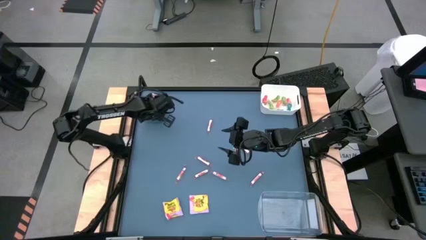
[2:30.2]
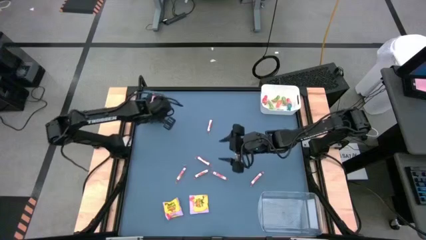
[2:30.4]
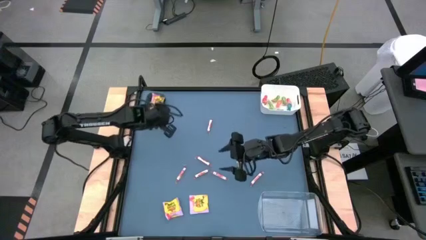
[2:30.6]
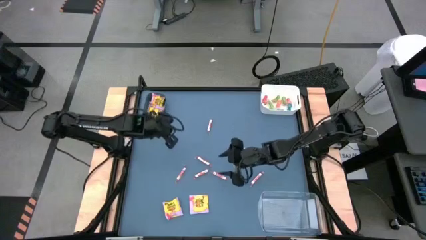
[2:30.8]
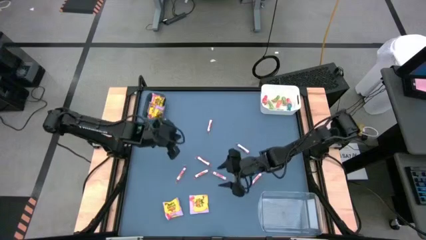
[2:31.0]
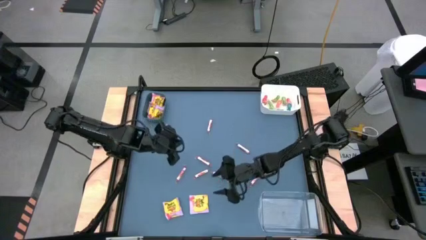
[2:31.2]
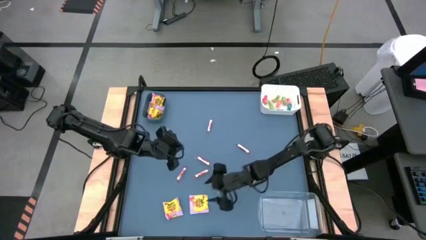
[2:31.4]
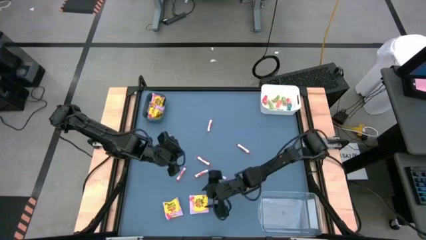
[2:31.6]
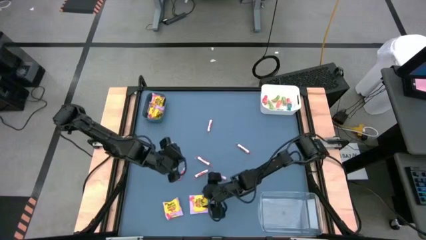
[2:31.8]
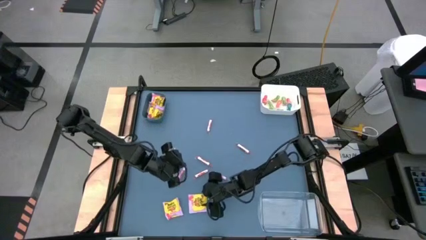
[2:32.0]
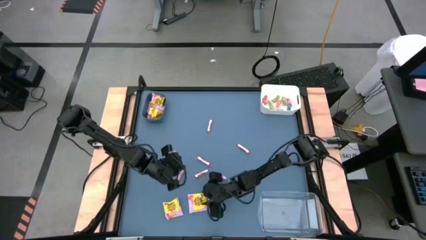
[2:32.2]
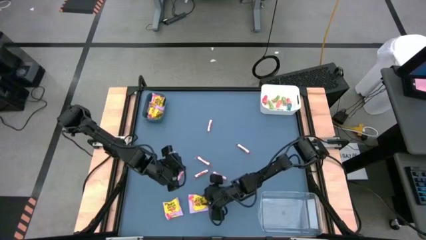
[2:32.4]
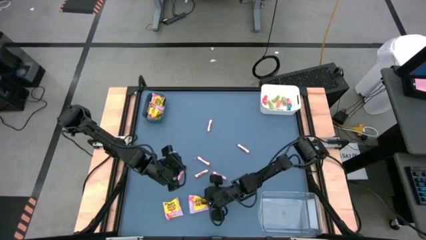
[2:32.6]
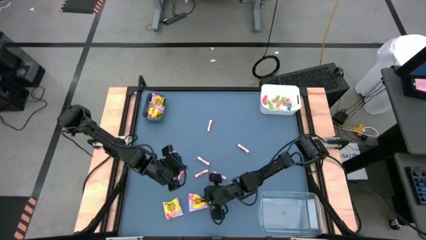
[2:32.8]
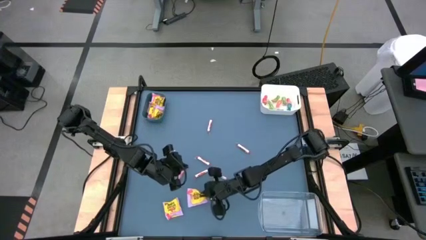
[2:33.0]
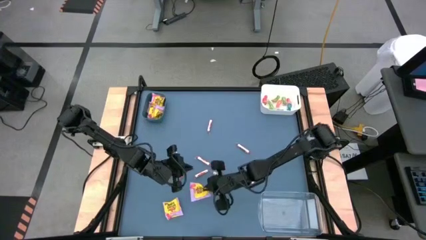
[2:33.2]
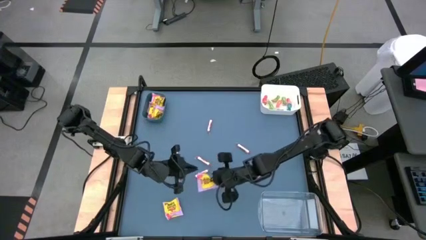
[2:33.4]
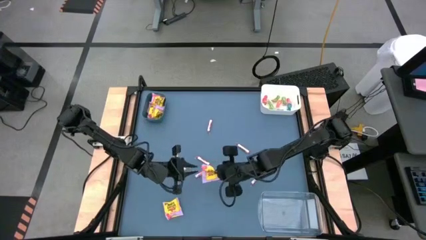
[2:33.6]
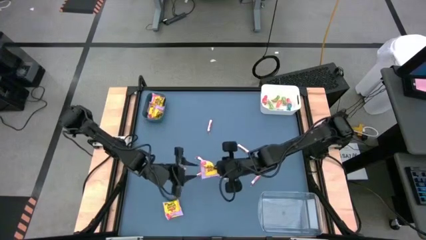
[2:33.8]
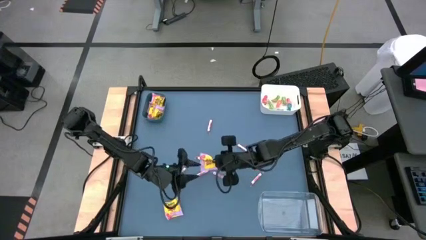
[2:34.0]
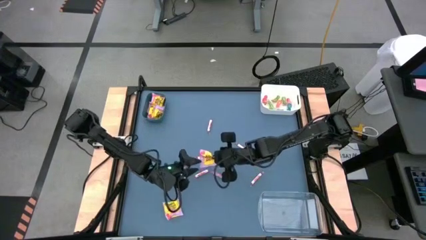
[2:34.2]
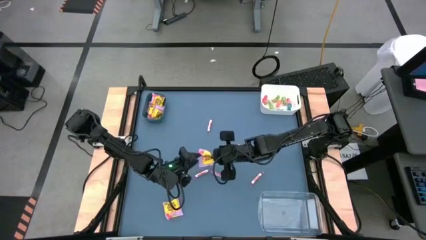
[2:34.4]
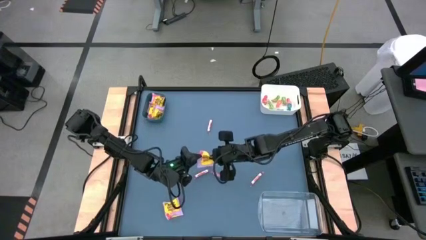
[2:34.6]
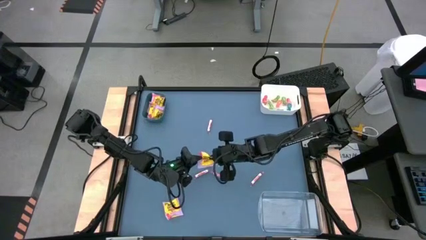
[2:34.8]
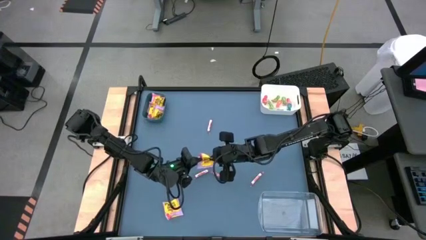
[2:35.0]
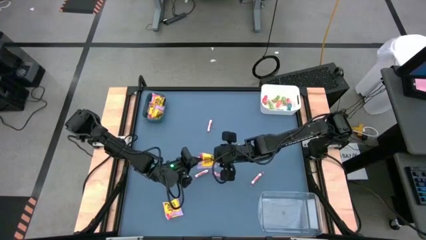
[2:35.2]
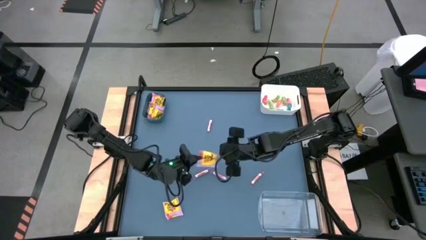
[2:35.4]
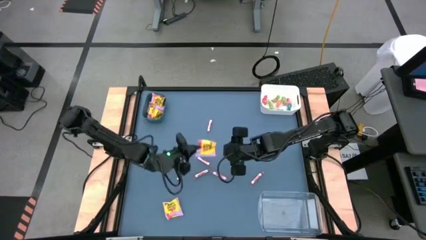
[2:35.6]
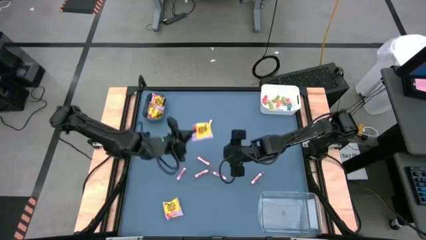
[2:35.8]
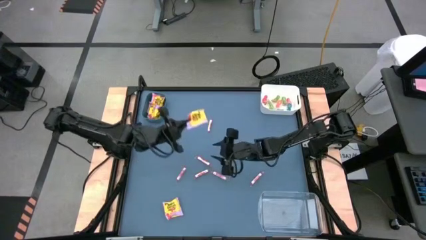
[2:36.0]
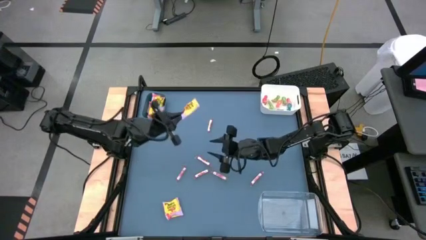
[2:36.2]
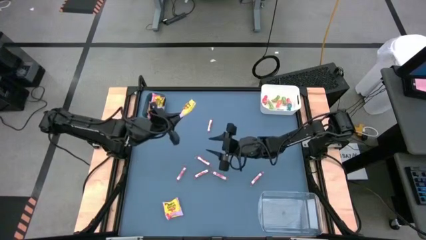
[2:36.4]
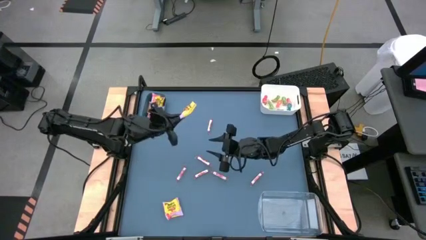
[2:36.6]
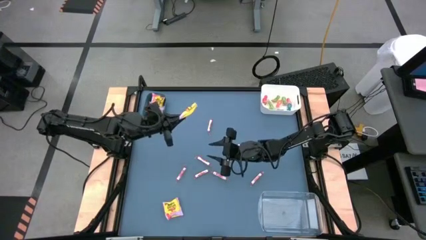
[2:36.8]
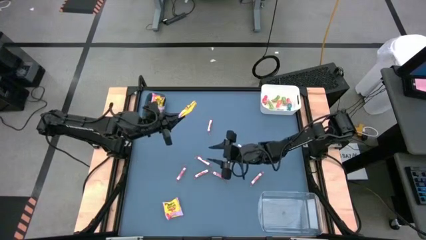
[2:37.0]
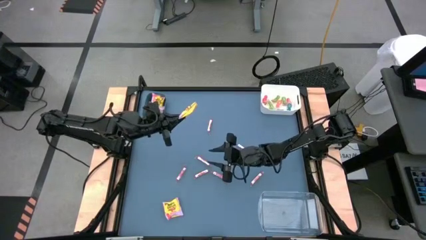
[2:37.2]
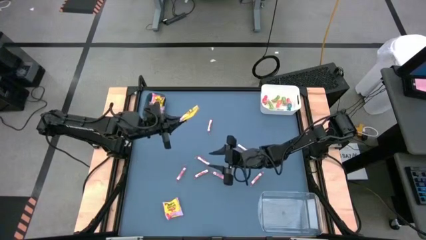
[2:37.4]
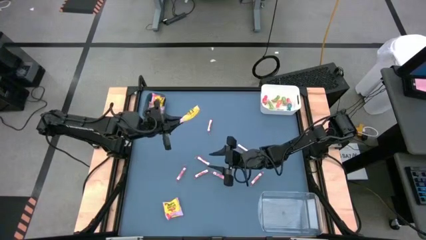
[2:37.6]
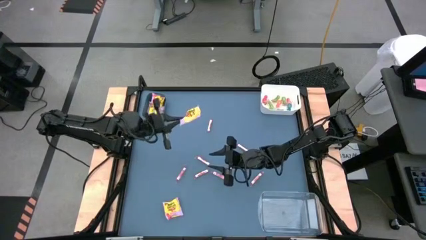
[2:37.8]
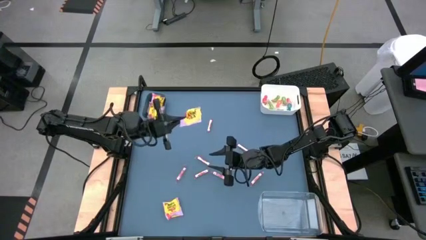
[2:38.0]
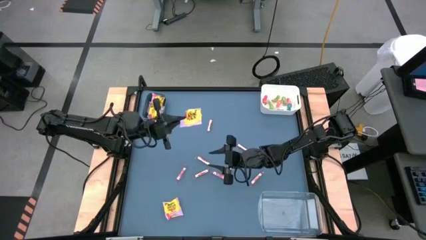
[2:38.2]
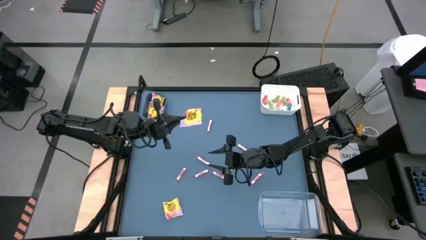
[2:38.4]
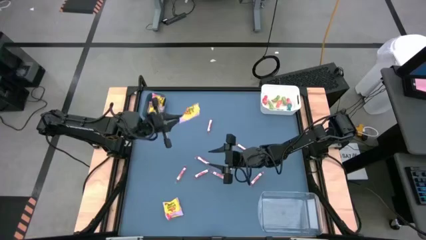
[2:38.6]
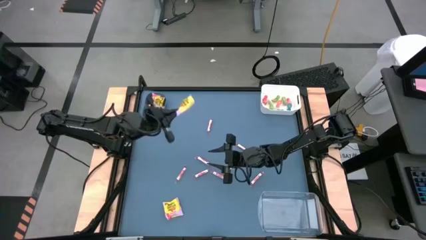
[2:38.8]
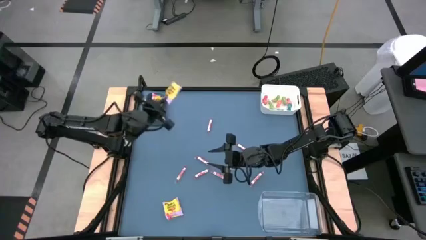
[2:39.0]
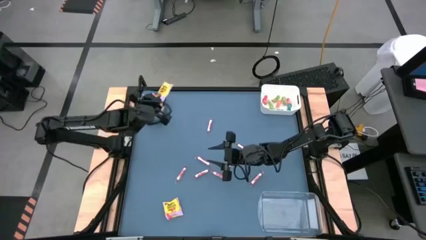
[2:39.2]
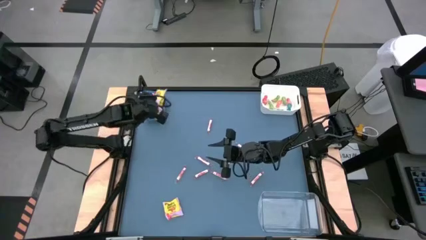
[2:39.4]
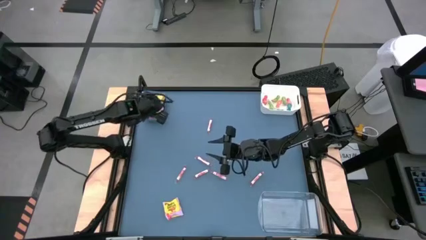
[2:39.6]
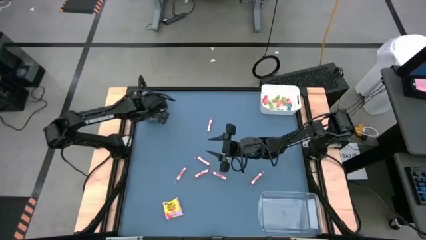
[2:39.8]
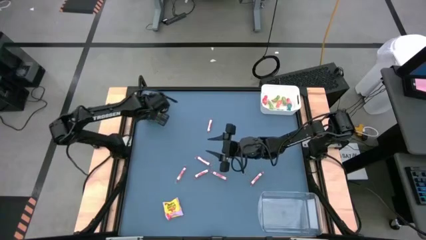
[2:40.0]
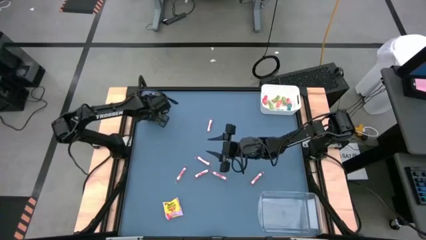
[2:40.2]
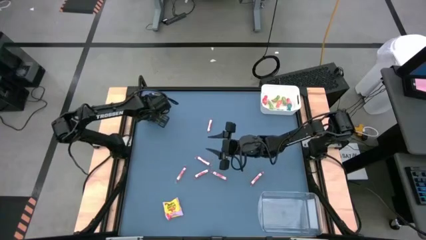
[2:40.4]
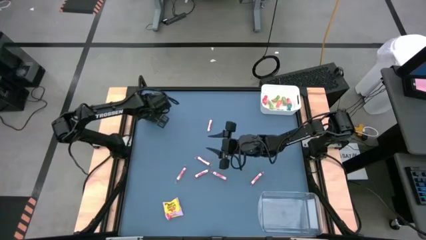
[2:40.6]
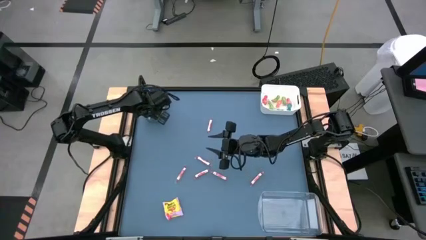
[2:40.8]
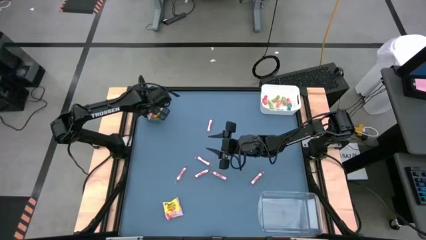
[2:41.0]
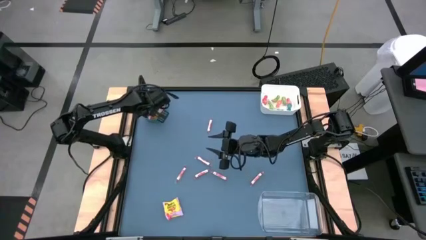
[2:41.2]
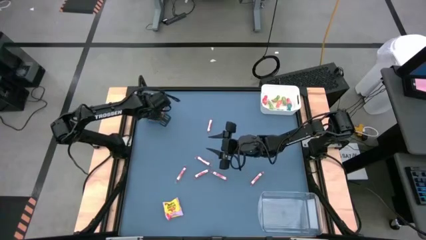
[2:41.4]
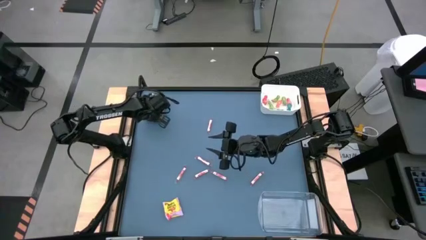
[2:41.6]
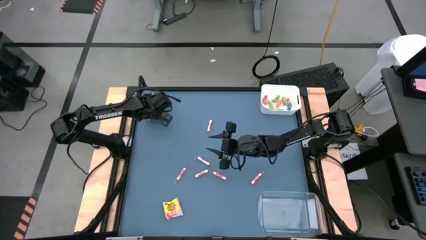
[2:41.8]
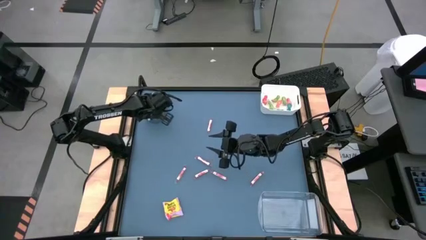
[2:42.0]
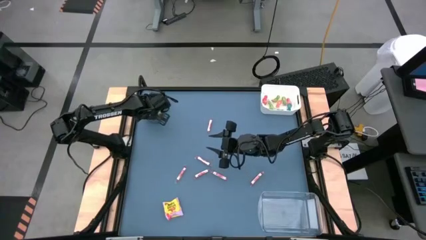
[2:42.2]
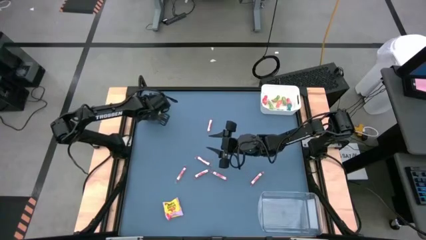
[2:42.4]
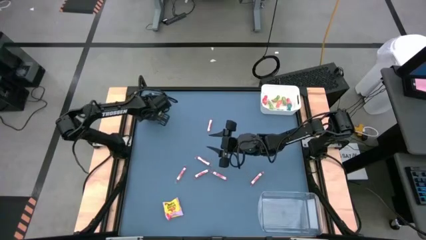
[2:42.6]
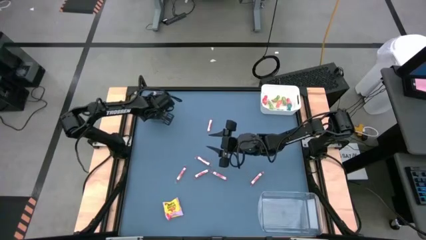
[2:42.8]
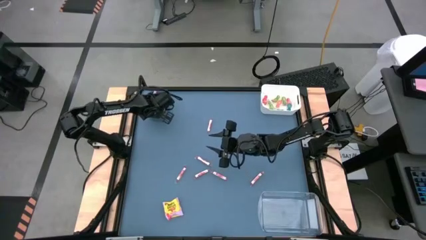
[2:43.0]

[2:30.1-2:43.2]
Task: Sort candy
Put the yellow candy pack into the blue bin
